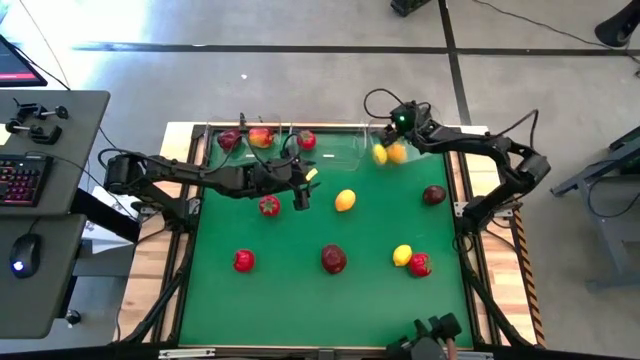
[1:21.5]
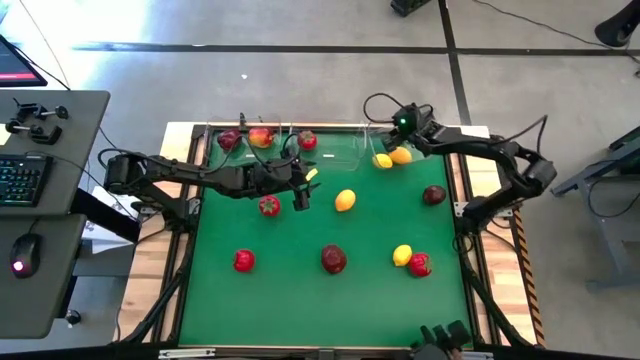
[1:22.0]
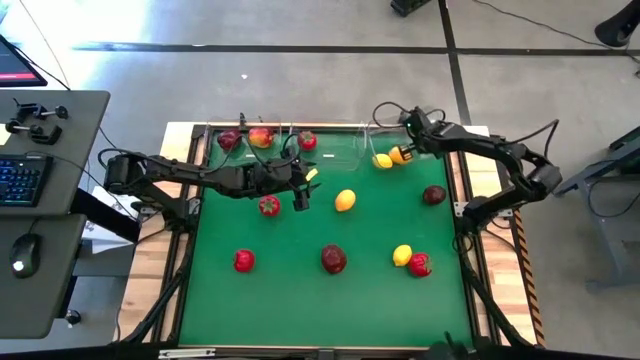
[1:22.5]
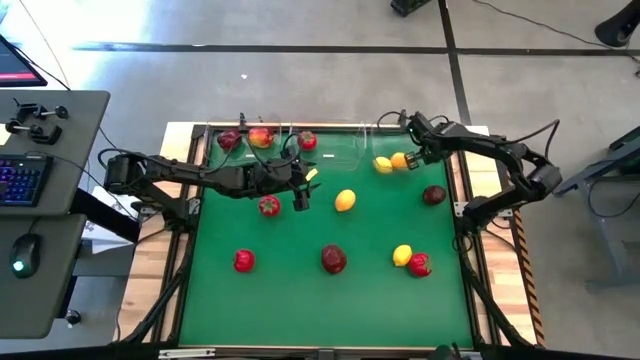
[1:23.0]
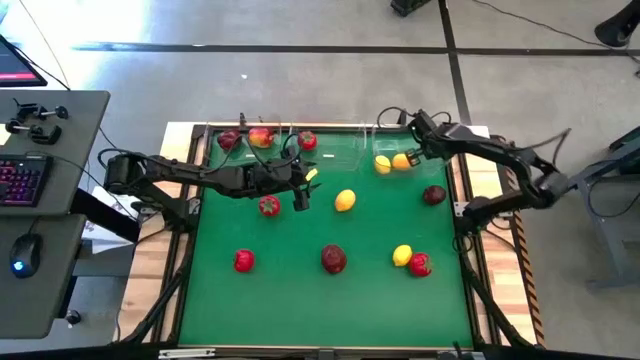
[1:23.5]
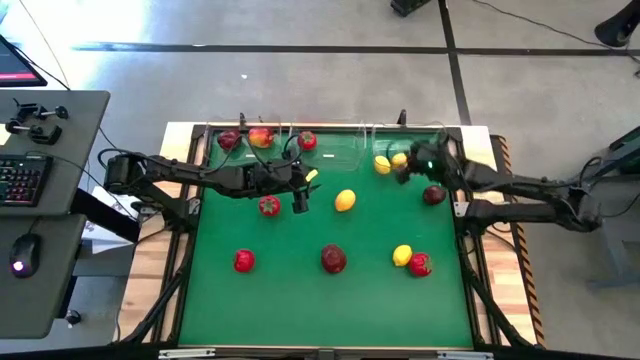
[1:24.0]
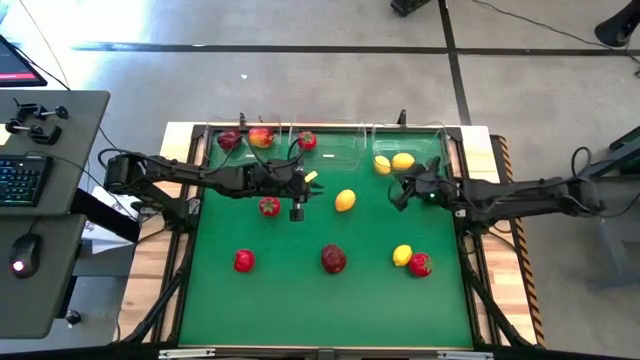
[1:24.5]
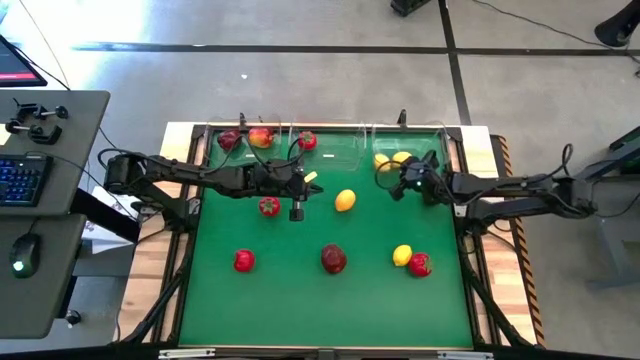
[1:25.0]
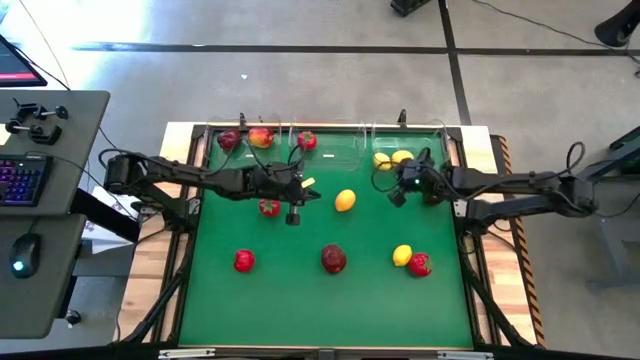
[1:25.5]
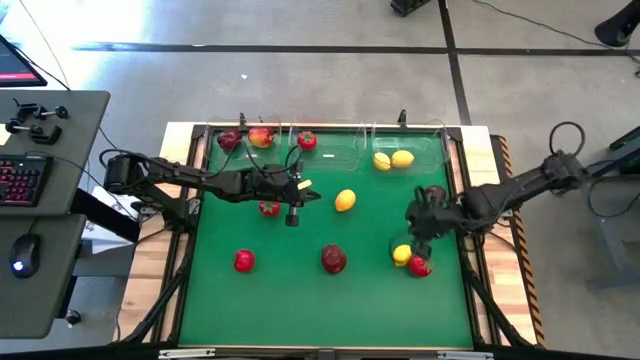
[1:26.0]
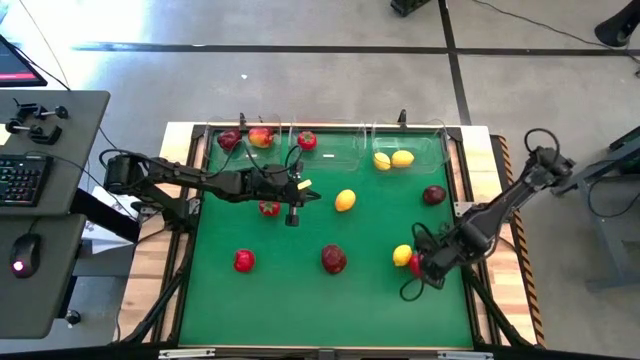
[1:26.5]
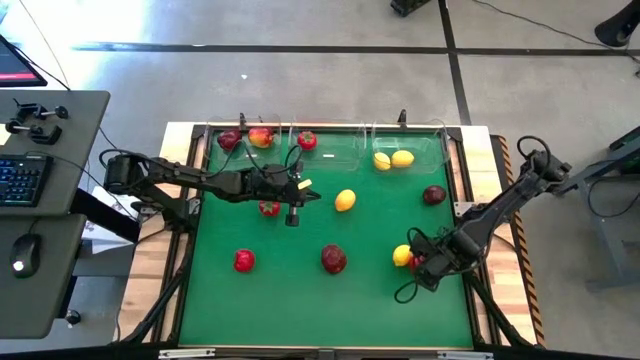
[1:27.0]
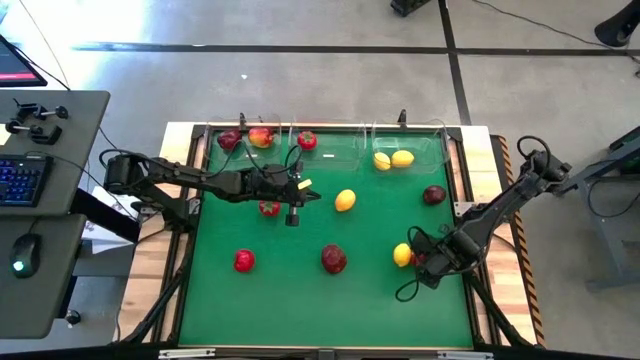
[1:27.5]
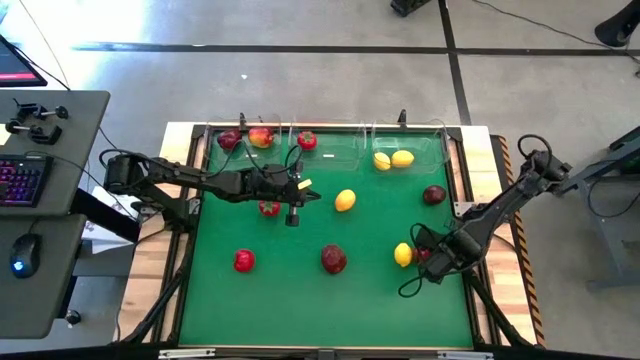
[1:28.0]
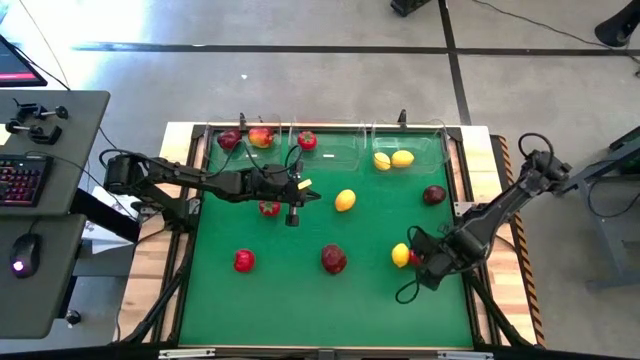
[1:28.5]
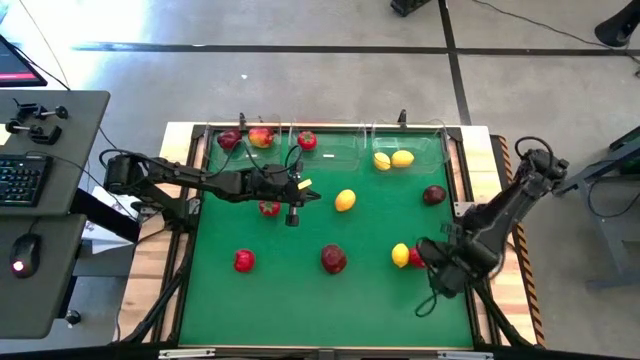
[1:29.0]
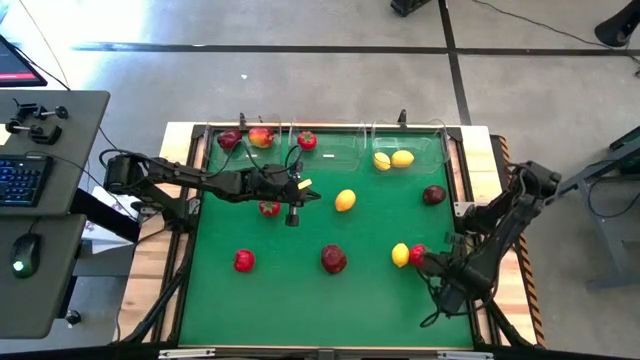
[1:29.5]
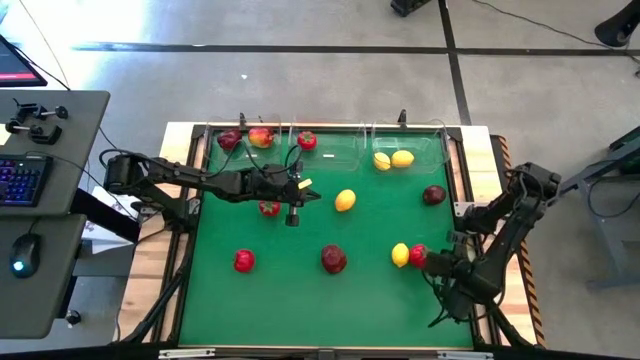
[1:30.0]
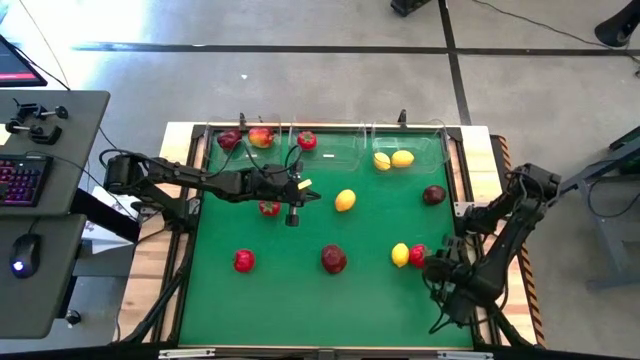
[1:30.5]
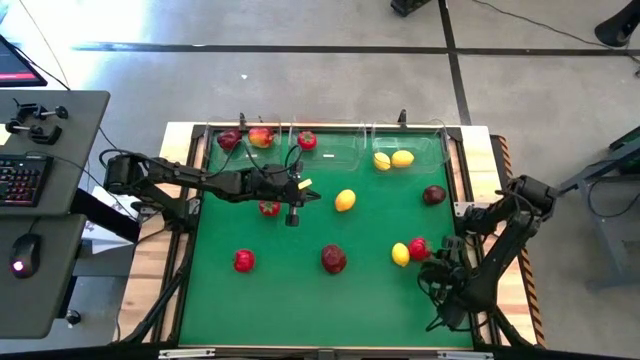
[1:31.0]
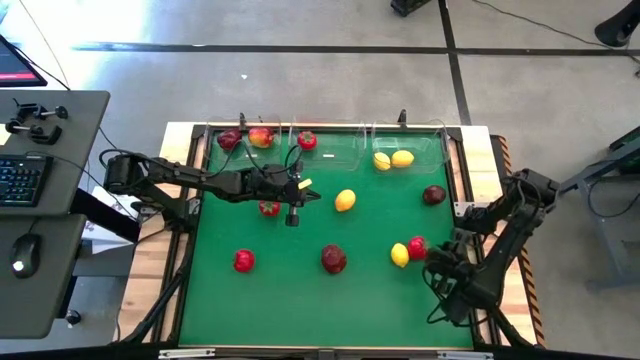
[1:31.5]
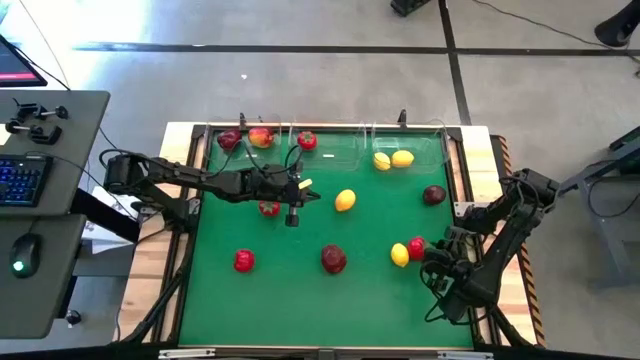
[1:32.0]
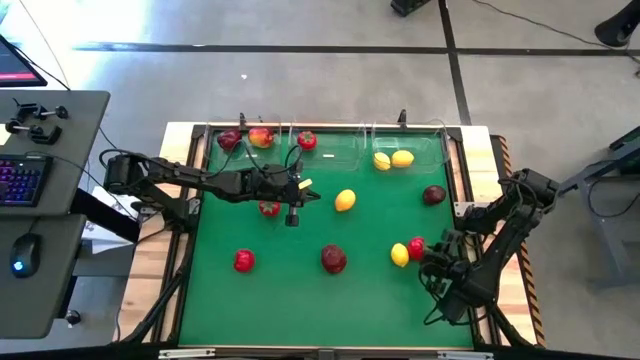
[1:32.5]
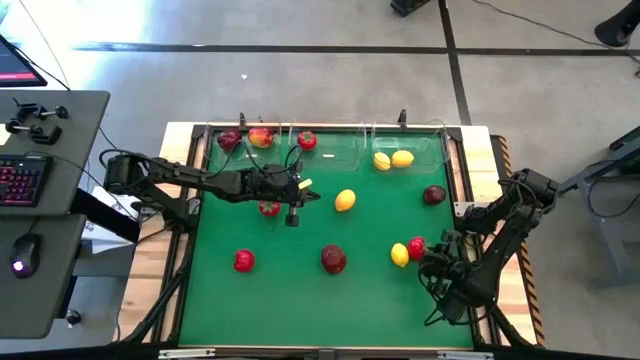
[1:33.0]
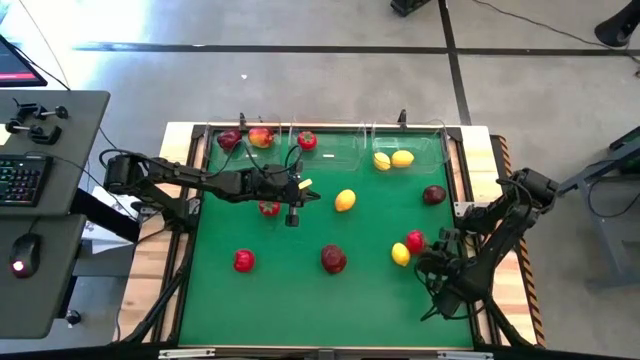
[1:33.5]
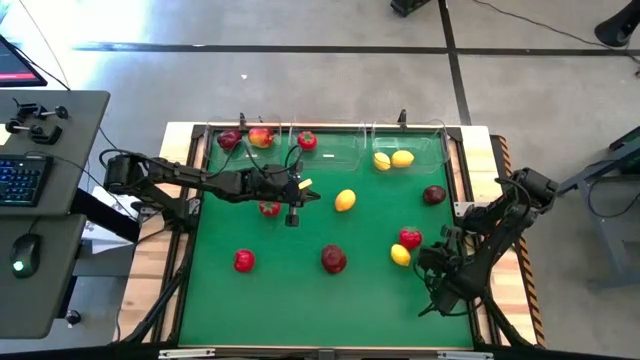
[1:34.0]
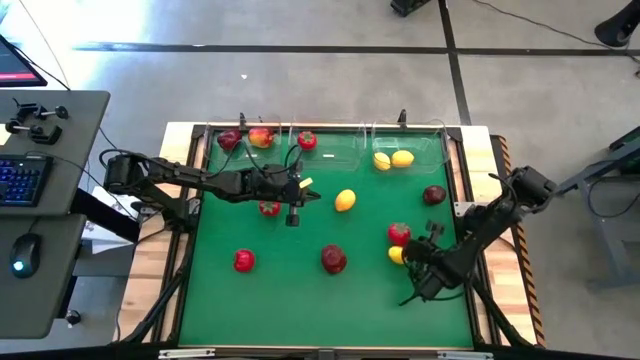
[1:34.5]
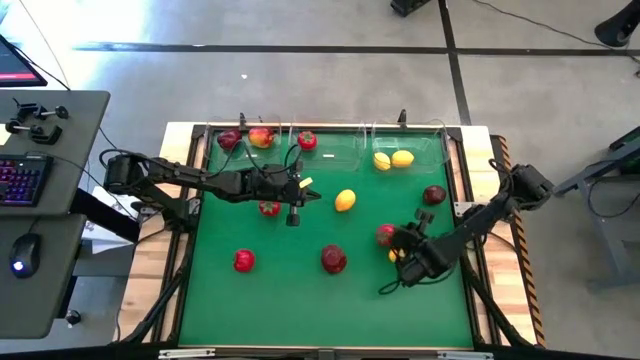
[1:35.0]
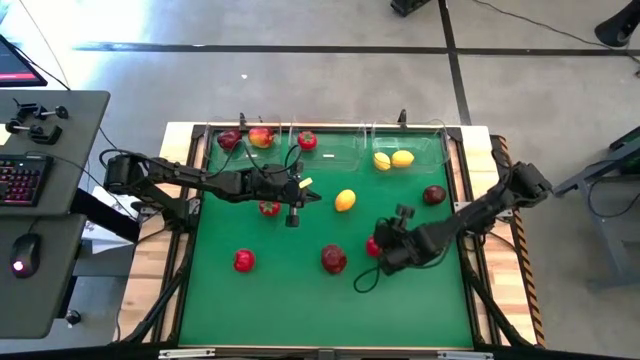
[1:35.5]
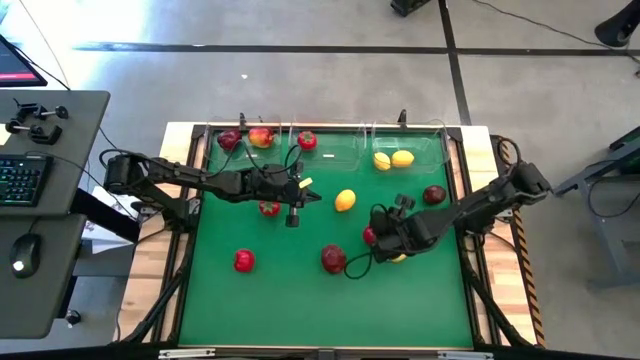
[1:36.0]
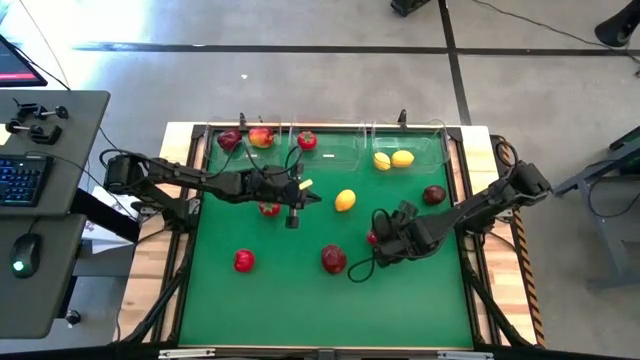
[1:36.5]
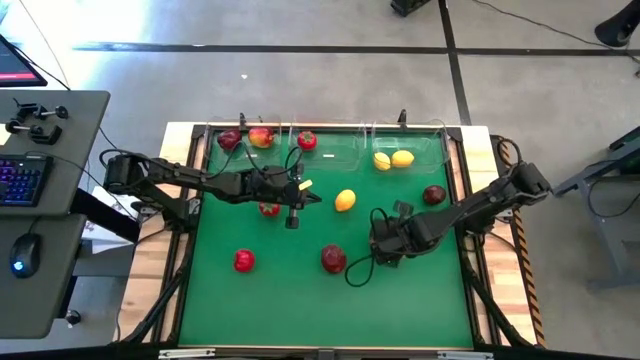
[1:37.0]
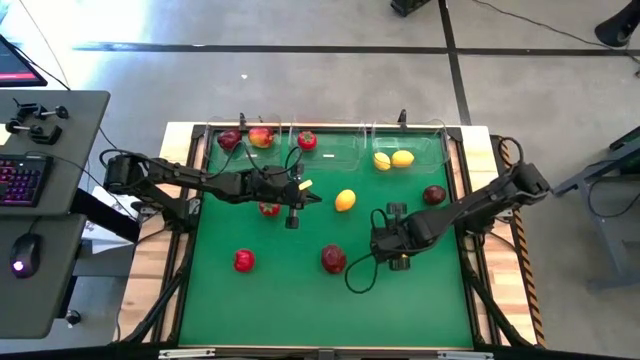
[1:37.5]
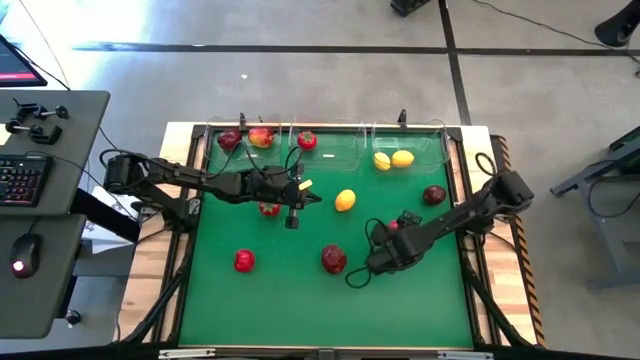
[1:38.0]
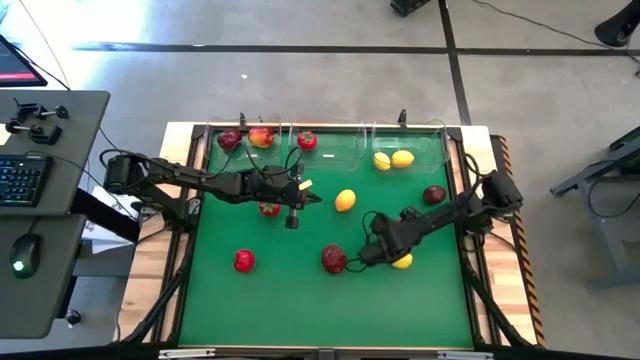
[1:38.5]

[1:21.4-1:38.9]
Task: Sort produce into baskets
Put the bottom right tomato into the middle transparent bin

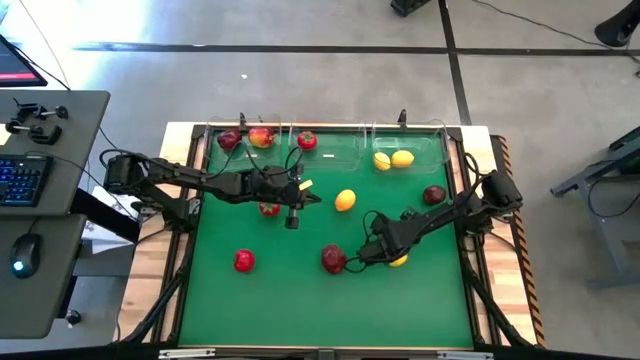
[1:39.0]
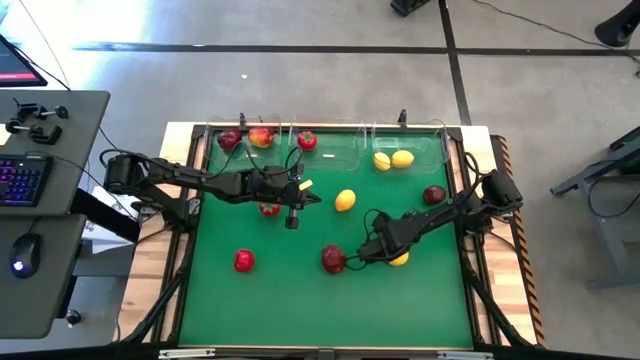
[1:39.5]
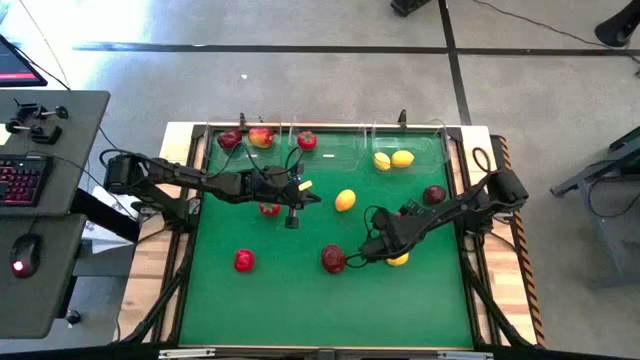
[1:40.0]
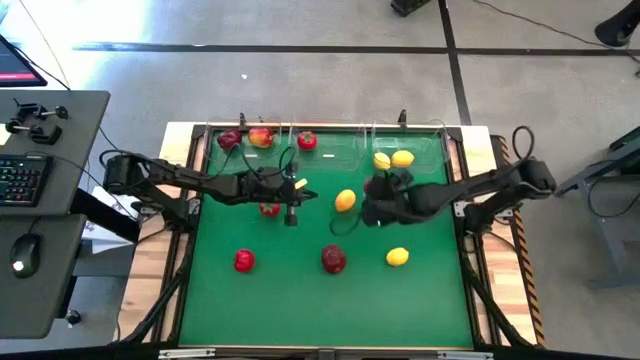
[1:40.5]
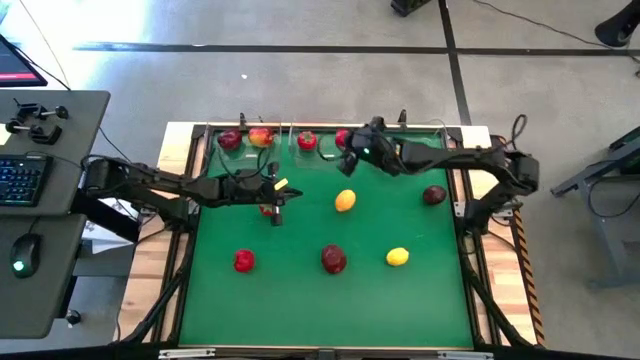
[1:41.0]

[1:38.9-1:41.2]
Put the bottom right tomato into the middle transparent bin

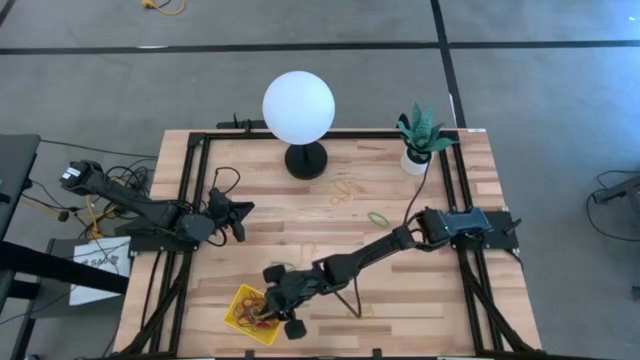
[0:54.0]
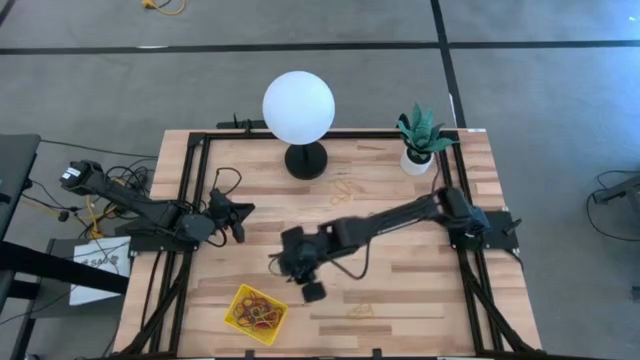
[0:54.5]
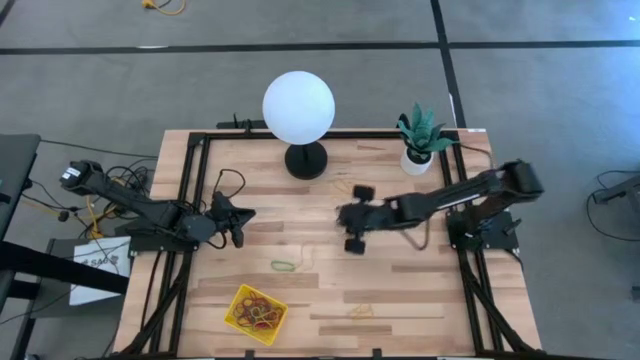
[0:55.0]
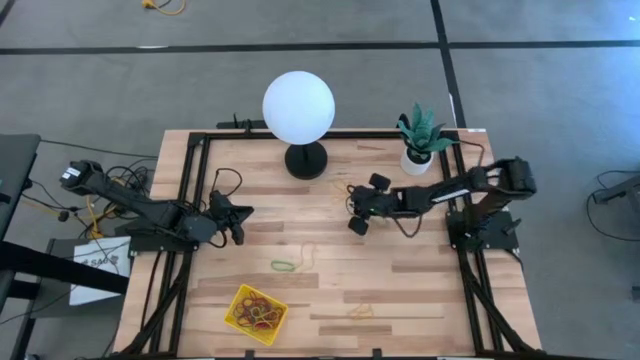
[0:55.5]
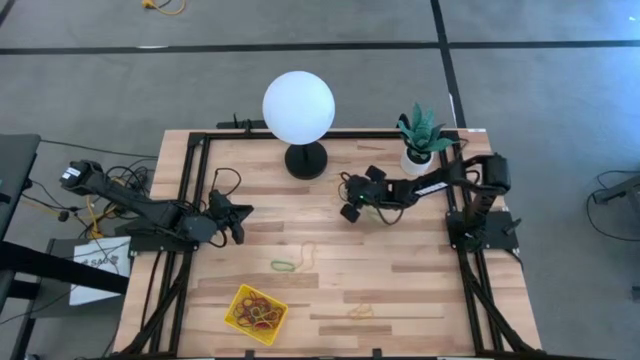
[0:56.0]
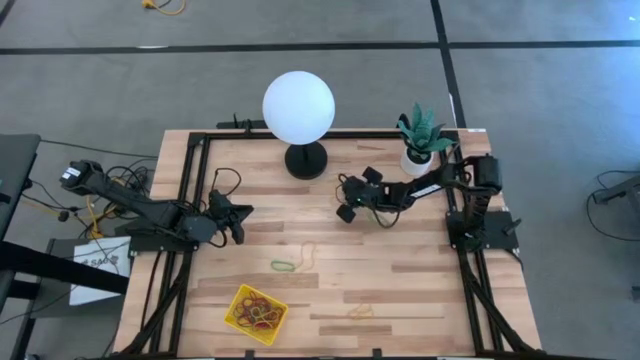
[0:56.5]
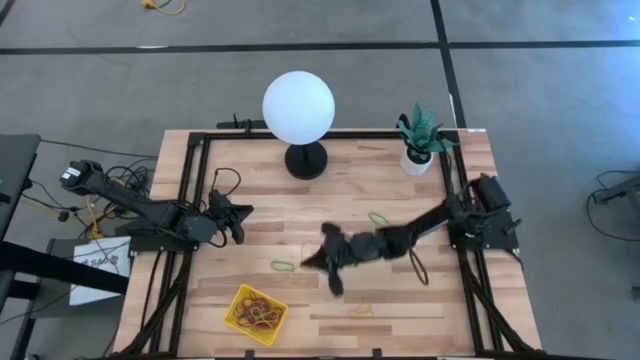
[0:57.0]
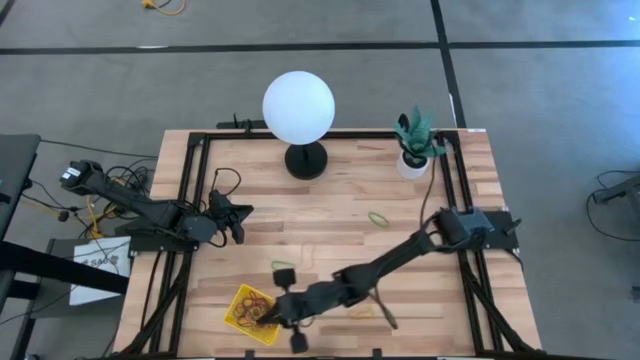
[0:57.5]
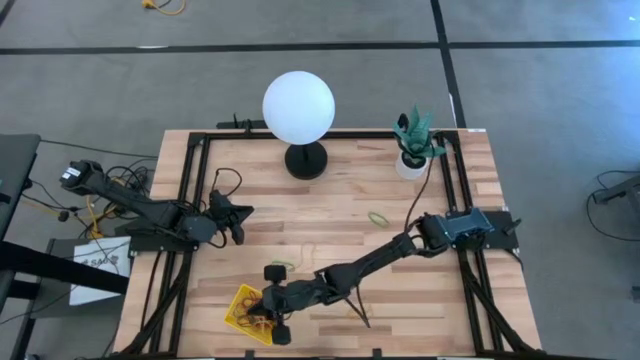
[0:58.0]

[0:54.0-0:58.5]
Task: Pick and place items into bin
Put the yellow rubber band into the yellow bin
